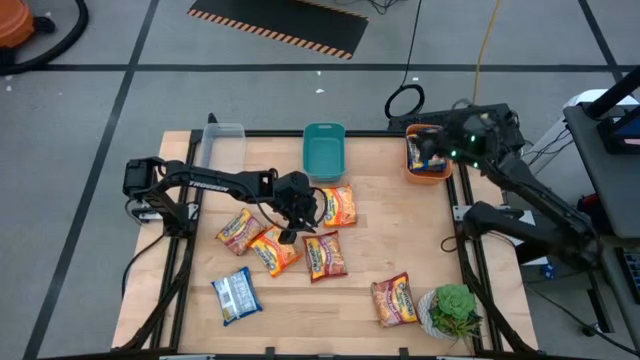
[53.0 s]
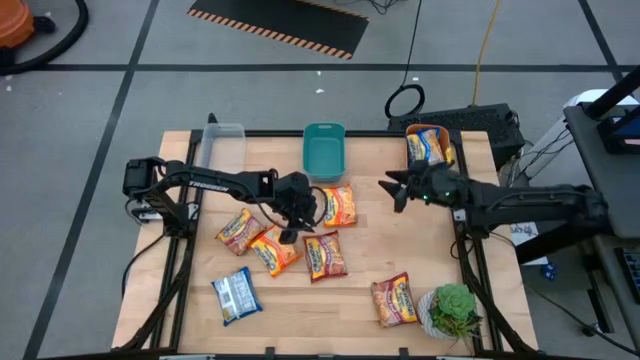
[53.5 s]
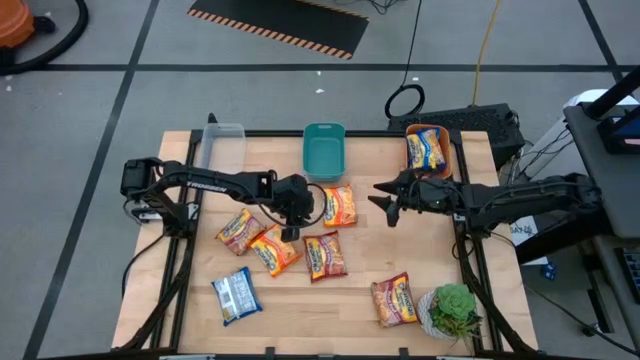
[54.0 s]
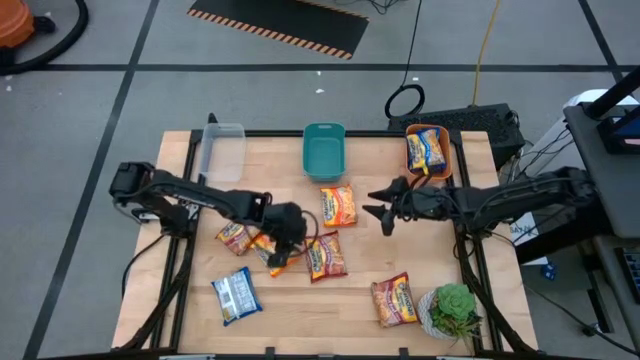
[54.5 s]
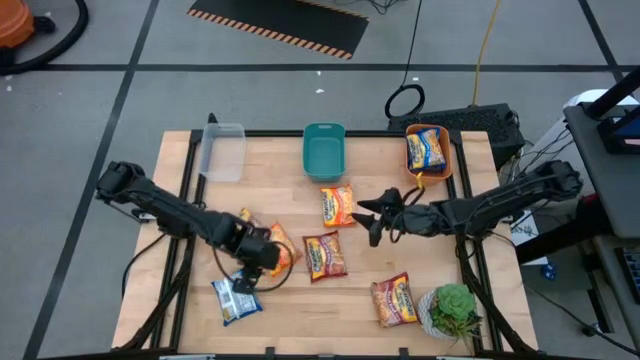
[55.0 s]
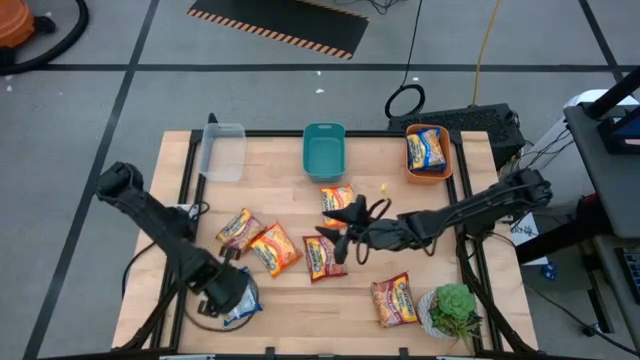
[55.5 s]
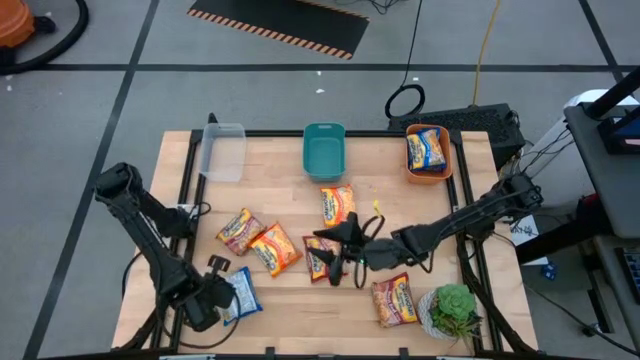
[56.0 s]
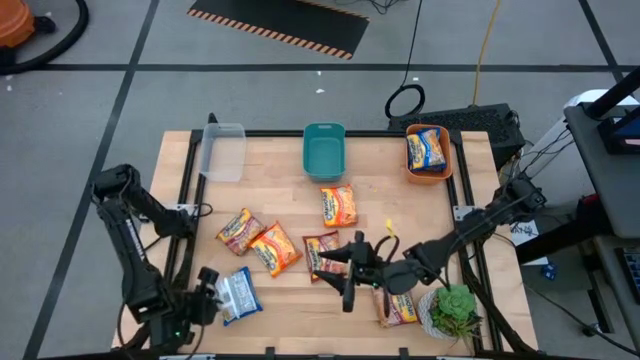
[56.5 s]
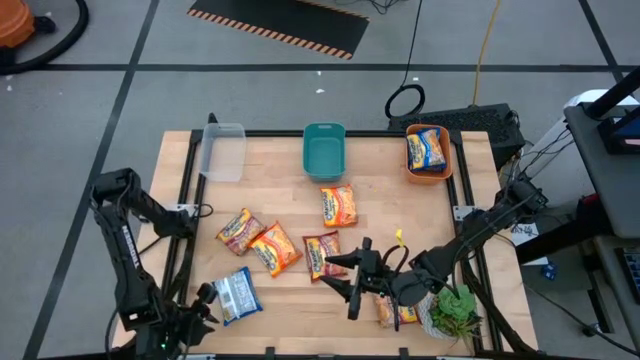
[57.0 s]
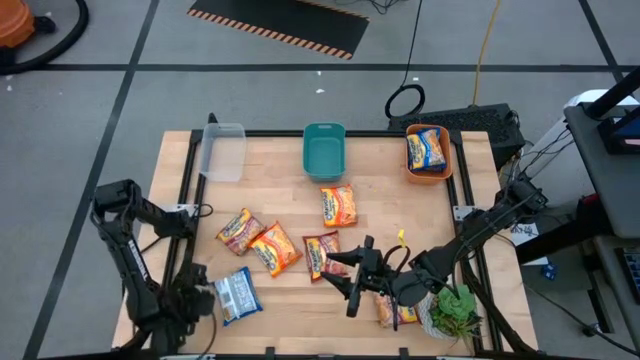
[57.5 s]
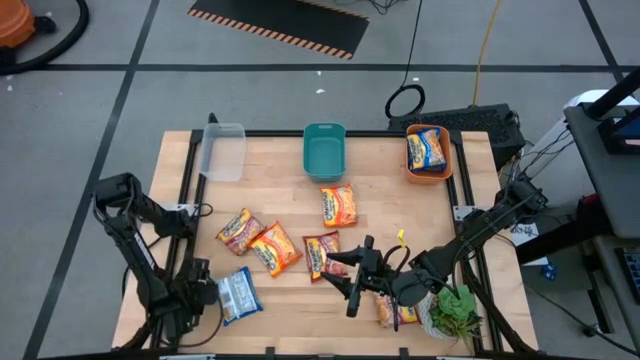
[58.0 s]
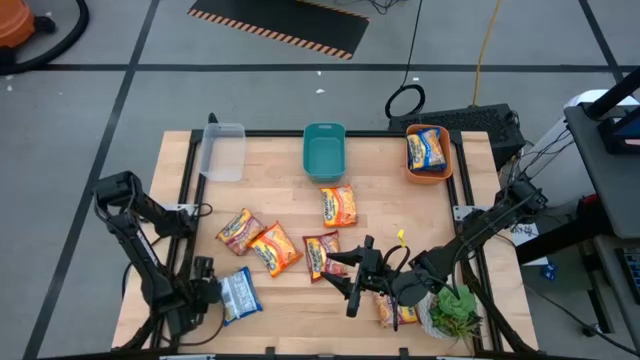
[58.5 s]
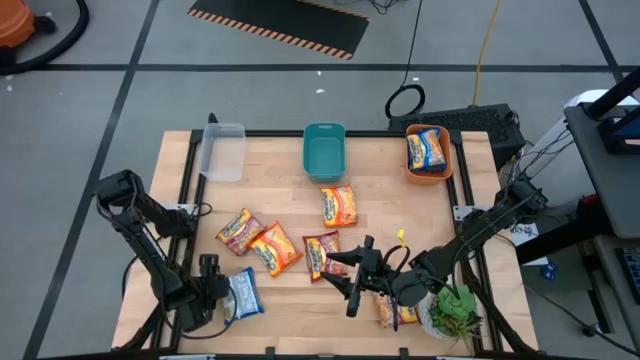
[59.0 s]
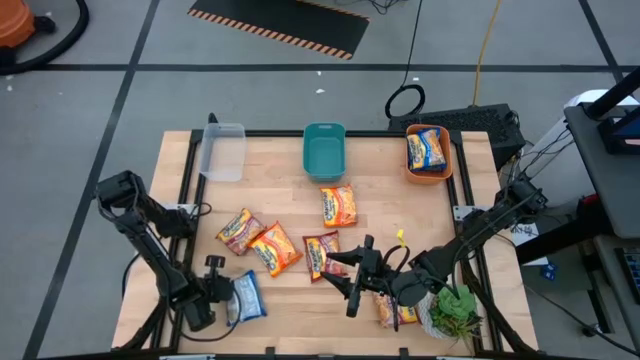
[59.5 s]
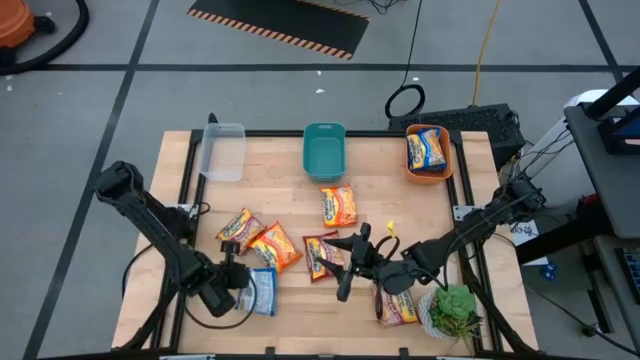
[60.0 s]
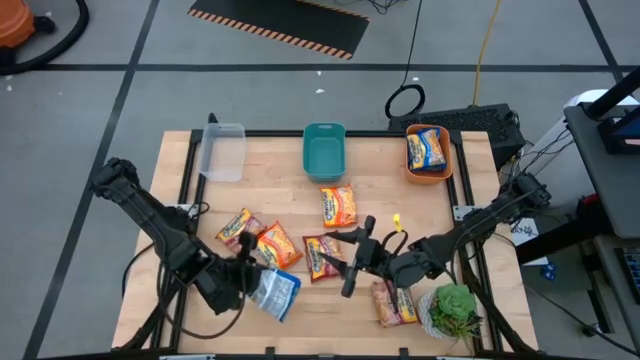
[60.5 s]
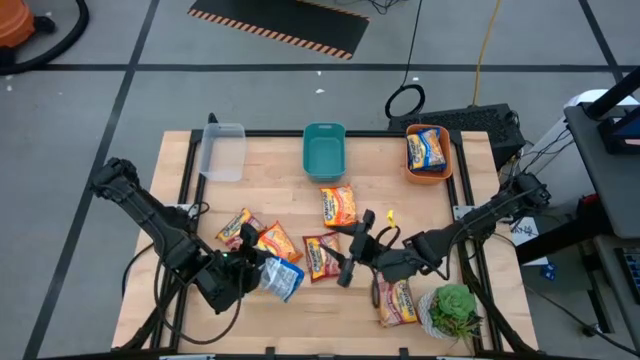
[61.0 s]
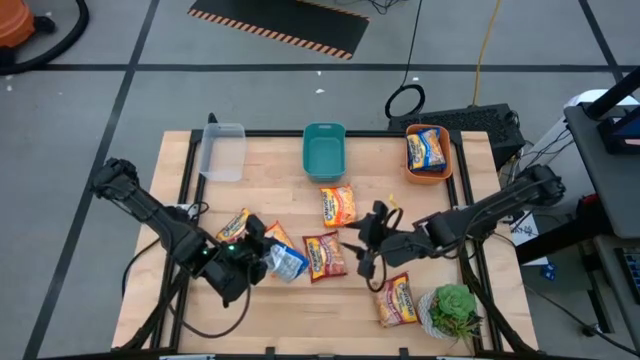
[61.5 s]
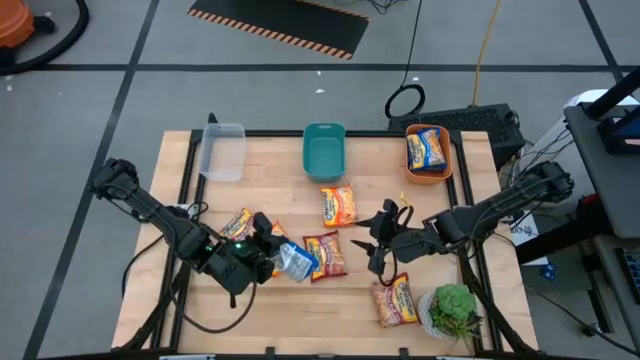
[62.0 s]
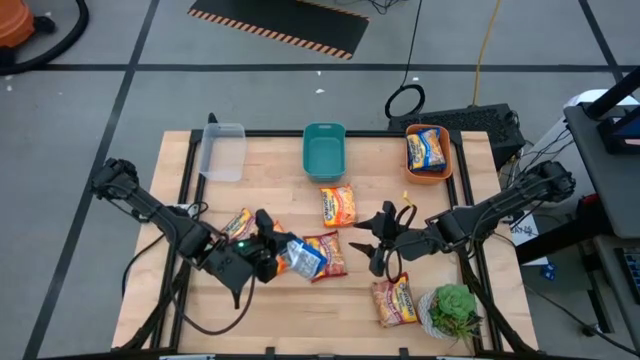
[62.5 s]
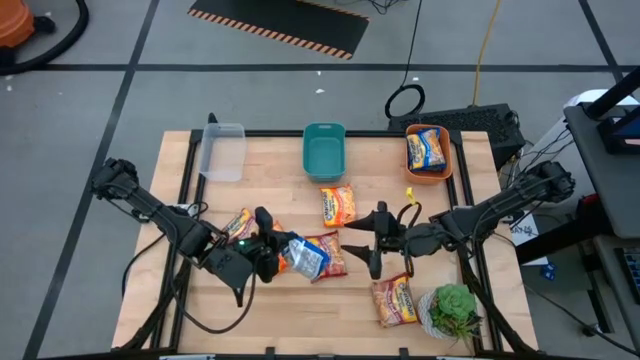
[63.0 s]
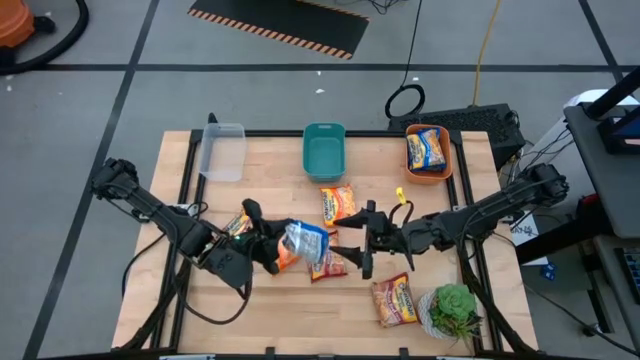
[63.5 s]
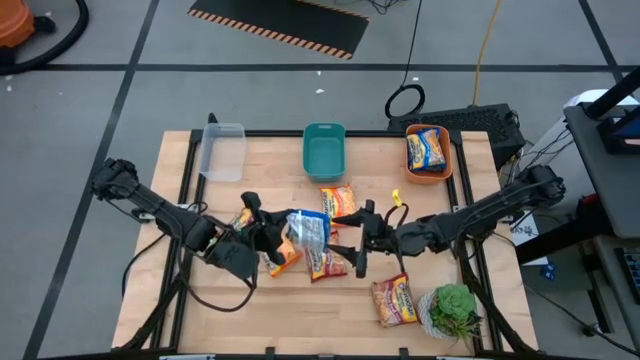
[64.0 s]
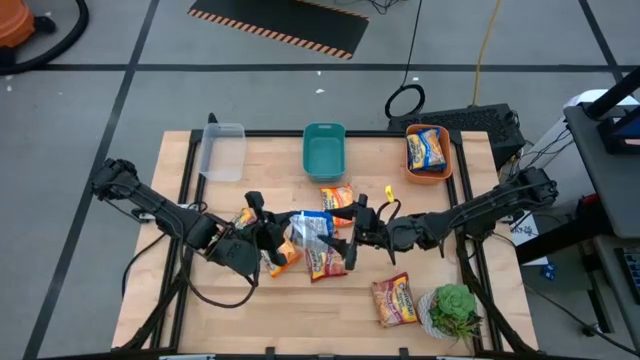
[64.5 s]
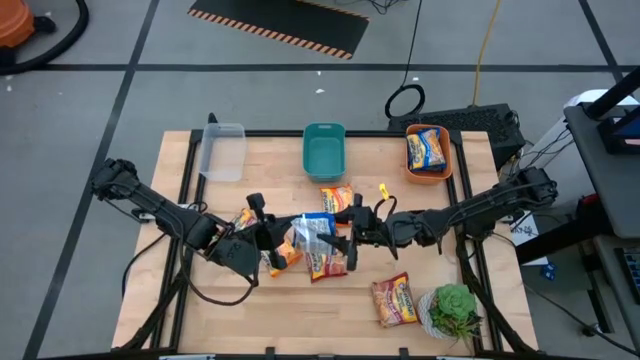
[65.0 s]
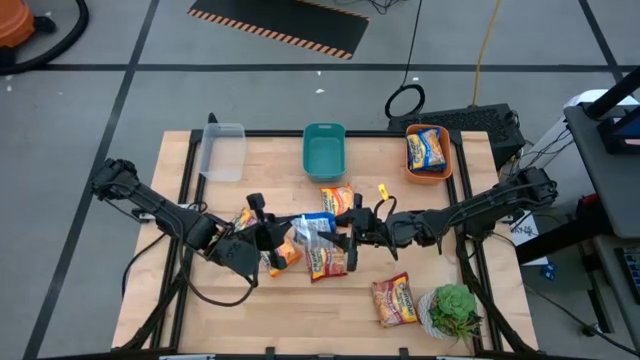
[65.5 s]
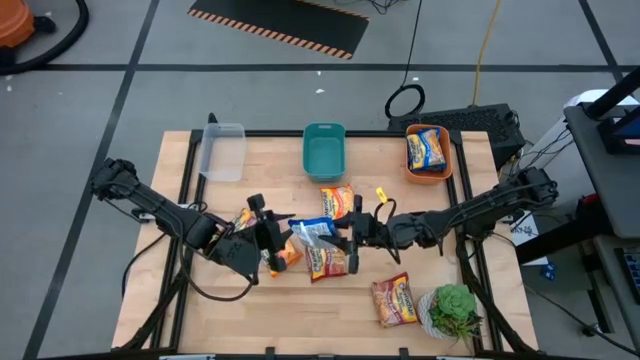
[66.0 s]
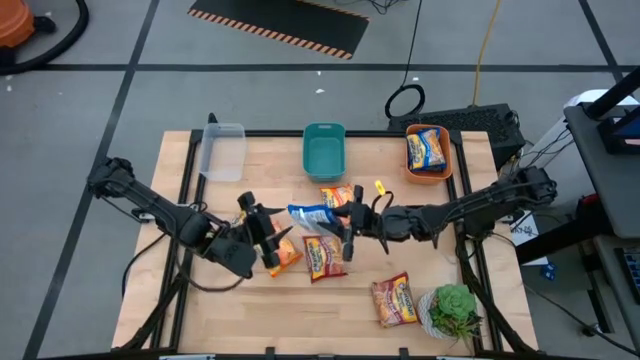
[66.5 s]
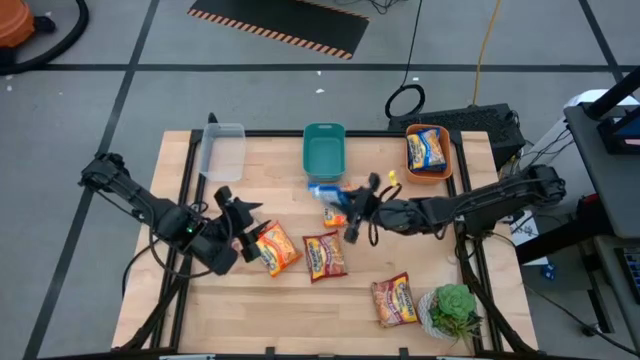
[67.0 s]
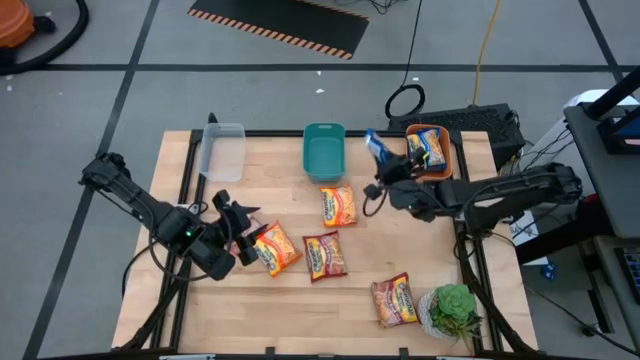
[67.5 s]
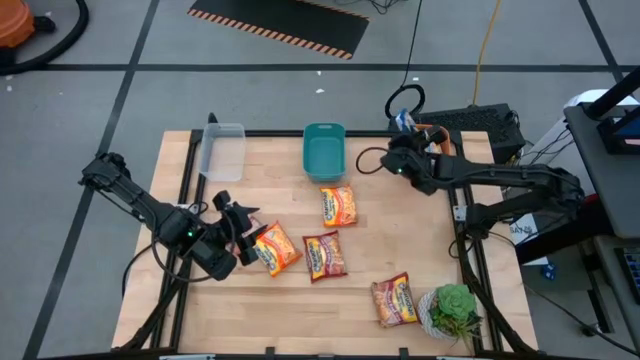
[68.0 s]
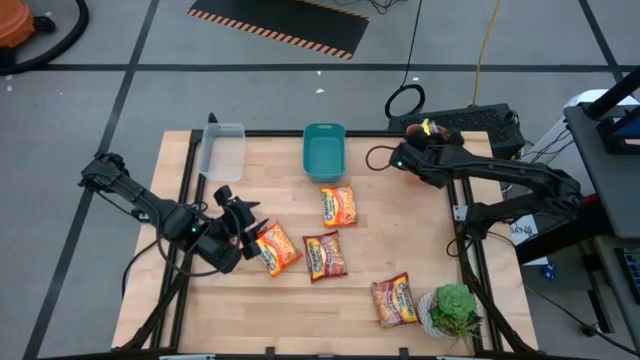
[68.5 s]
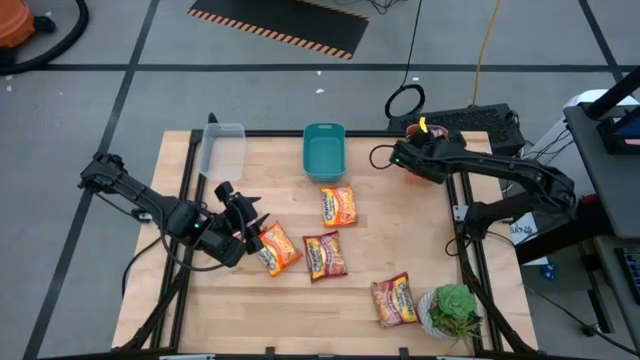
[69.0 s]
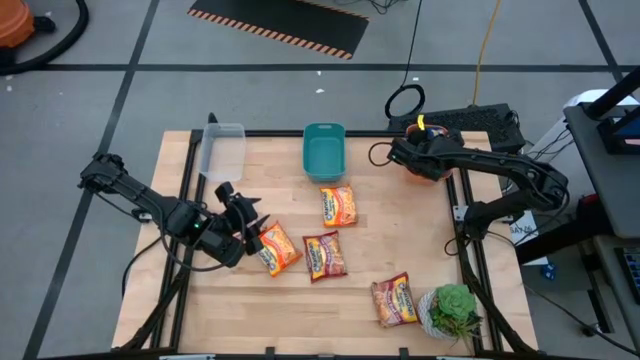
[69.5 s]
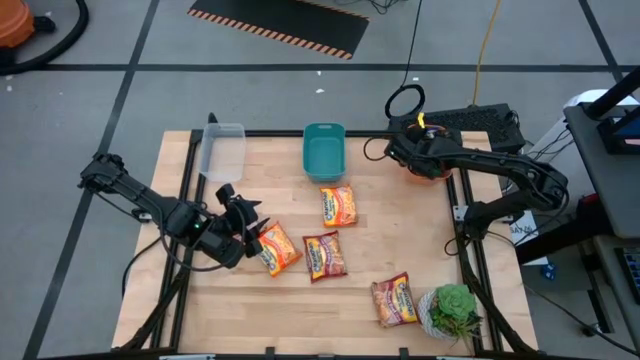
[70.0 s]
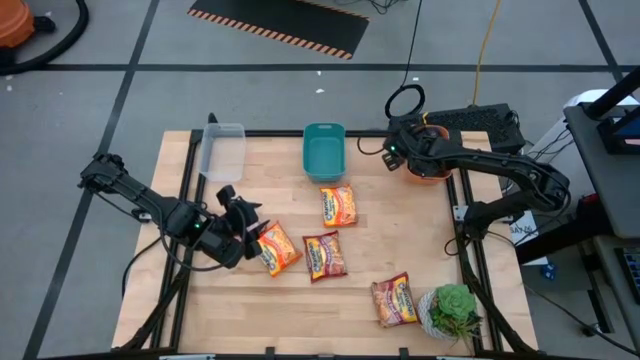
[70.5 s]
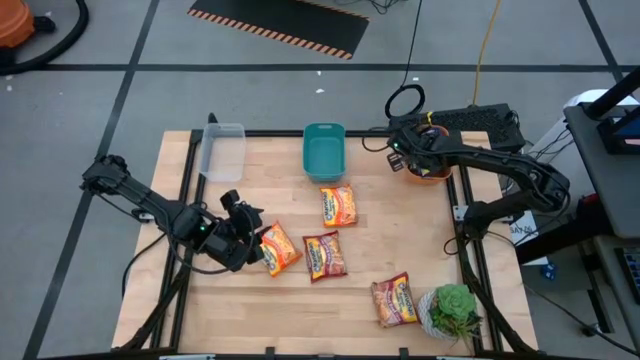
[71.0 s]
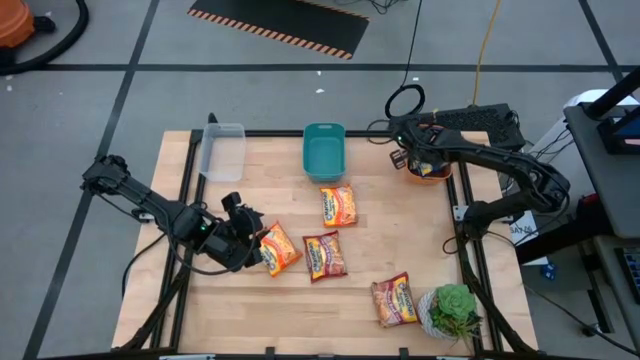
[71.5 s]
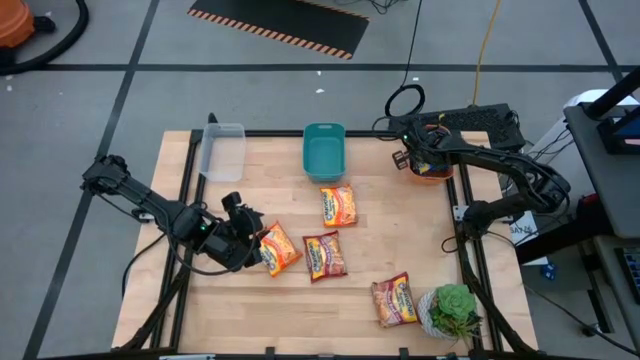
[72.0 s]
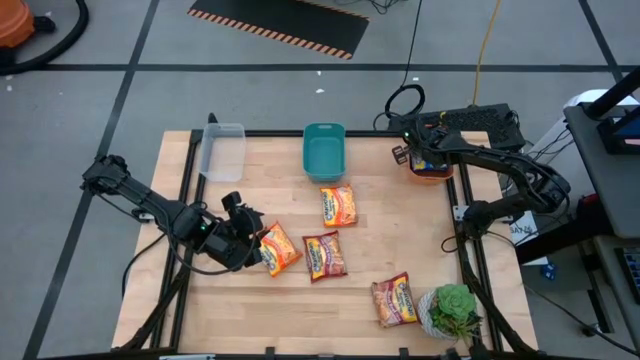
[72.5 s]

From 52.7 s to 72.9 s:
Task: Sort Maruchan noodles
Put the blue noodle pack into the orange bin

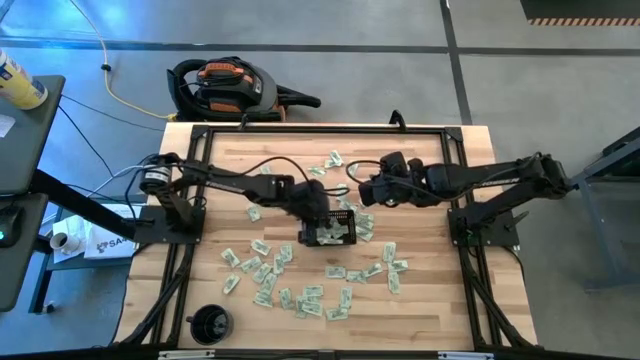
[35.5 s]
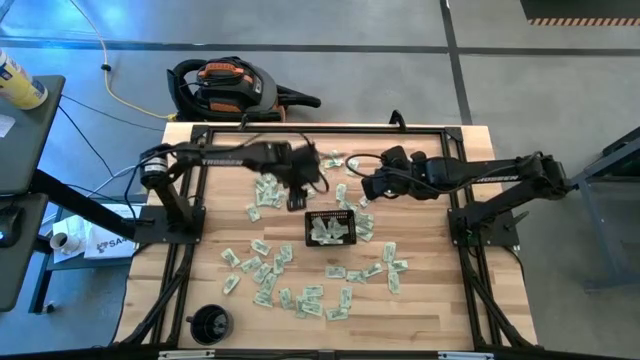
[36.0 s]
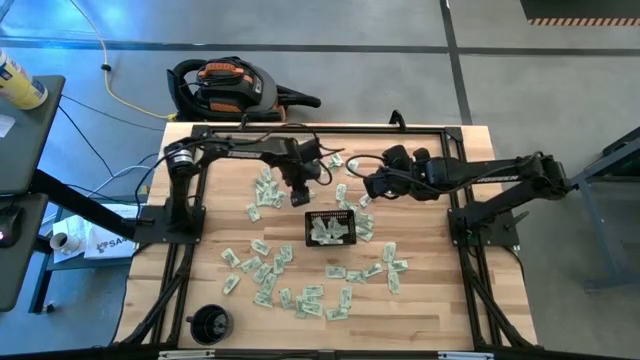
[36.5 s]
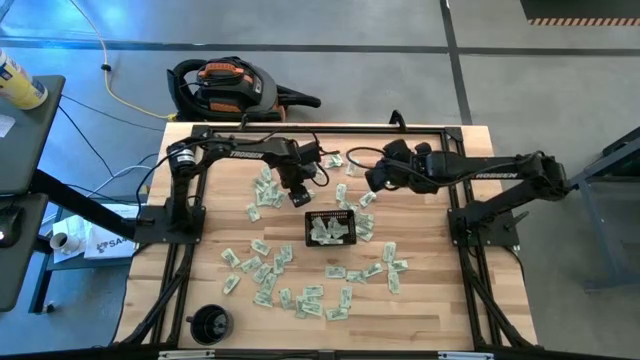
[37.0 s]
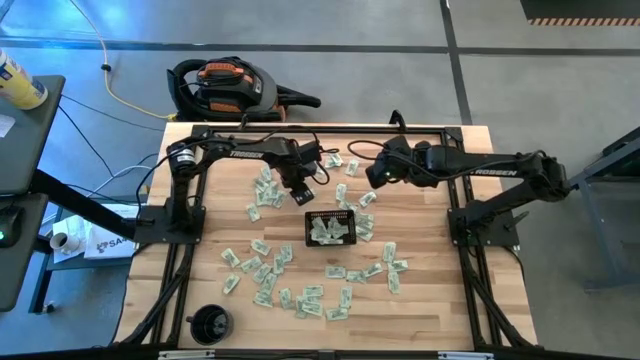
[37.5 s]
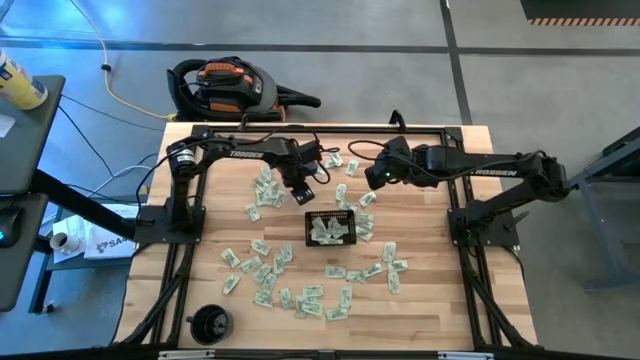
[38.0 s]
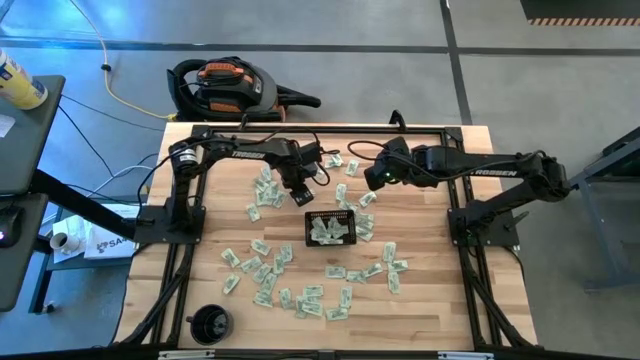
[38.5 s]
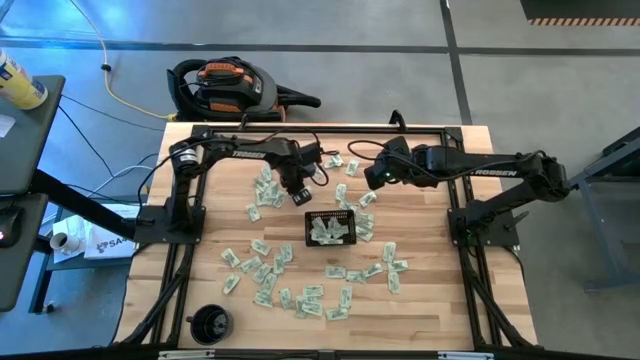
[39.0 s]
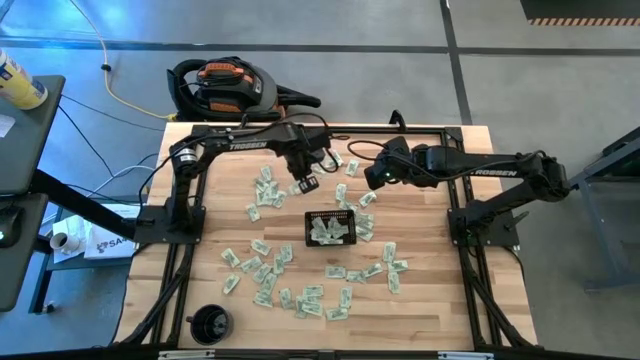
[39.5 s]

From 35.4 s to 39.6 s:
Task: Pick and place Stevia / Truvia into bins
Put the green stevia packet into the black basket
